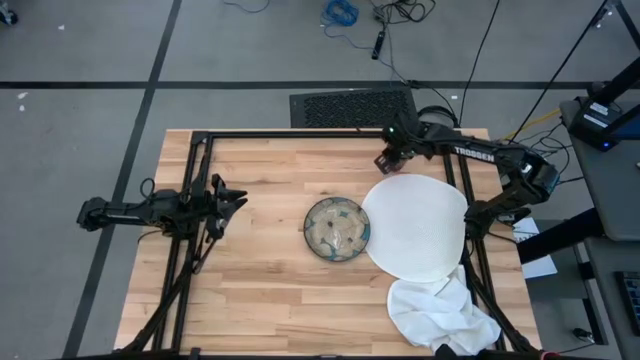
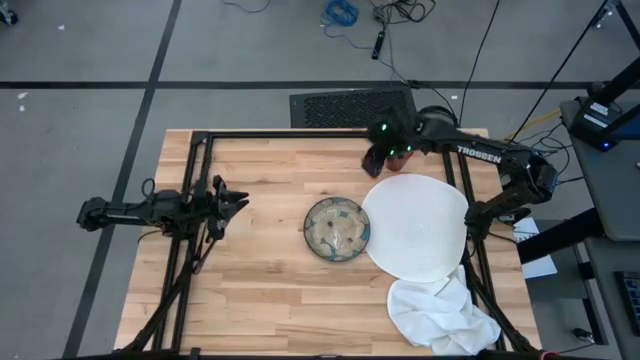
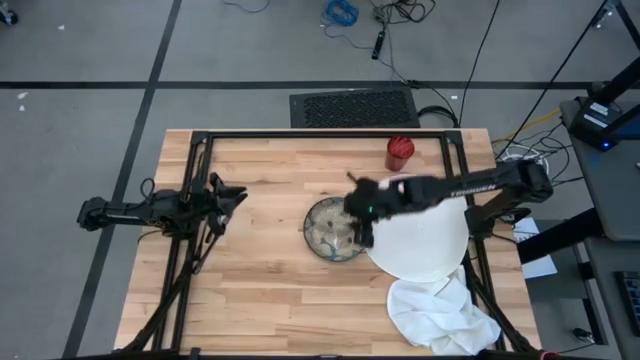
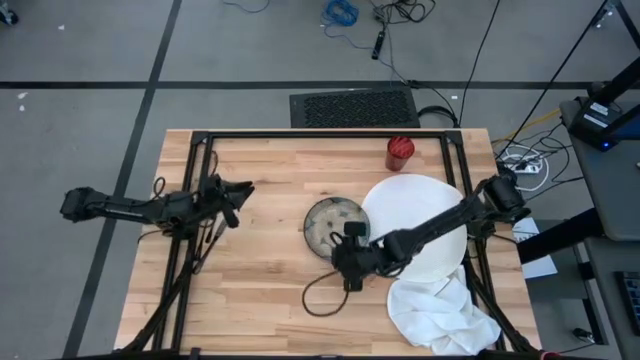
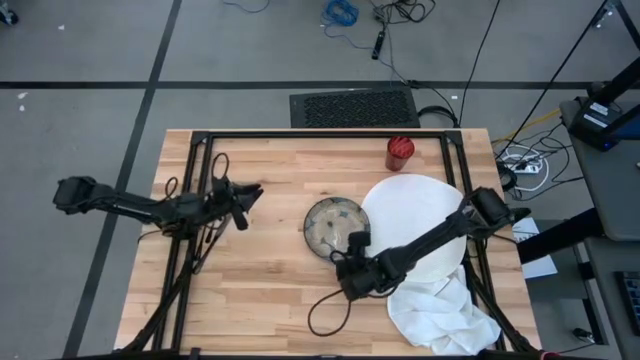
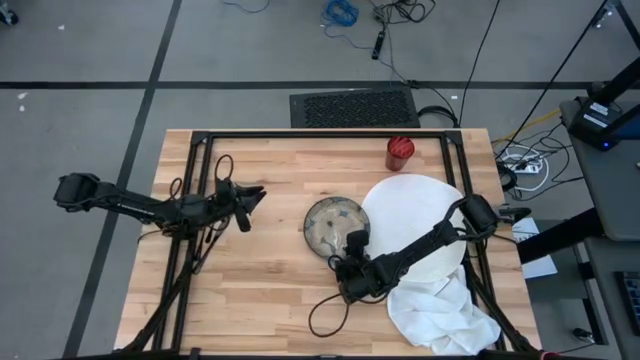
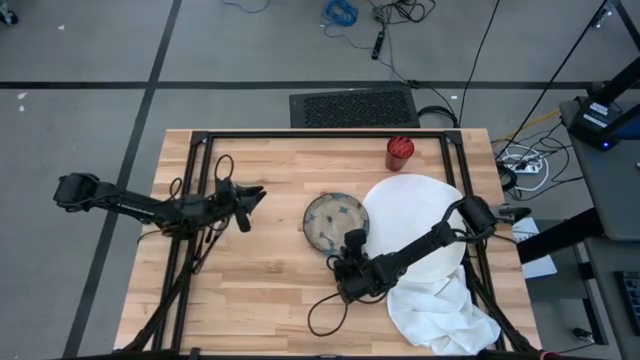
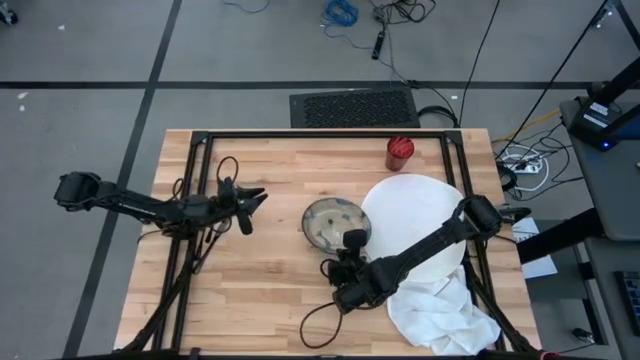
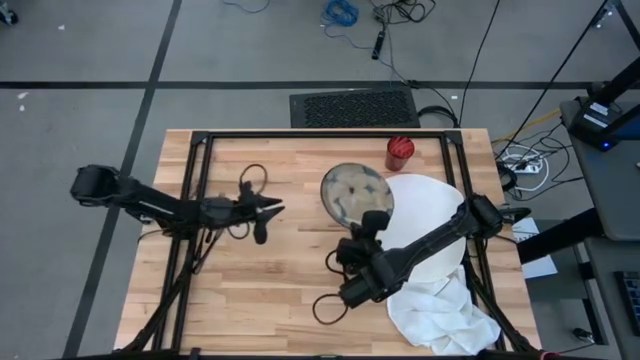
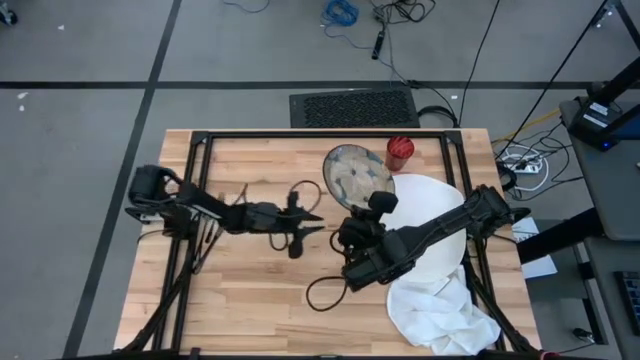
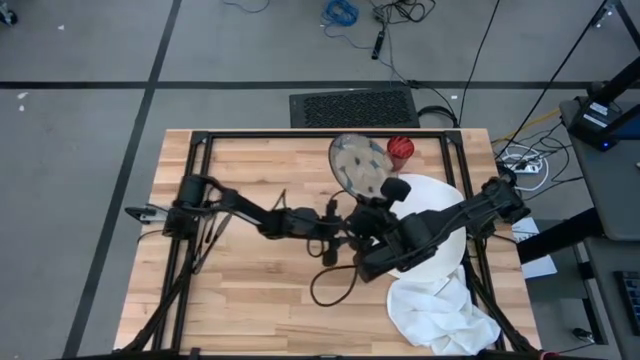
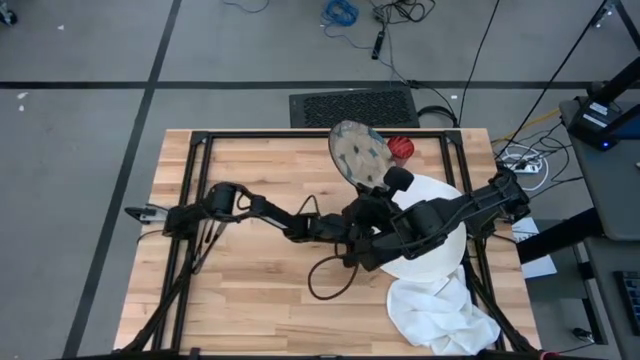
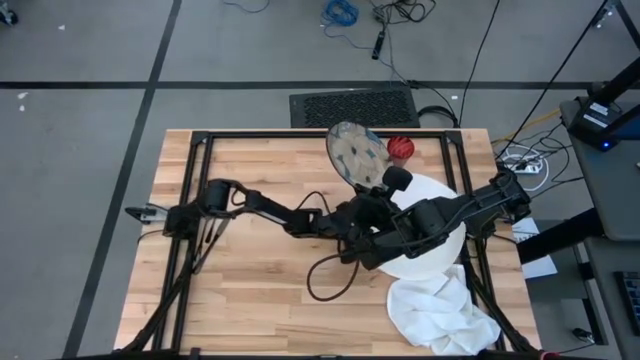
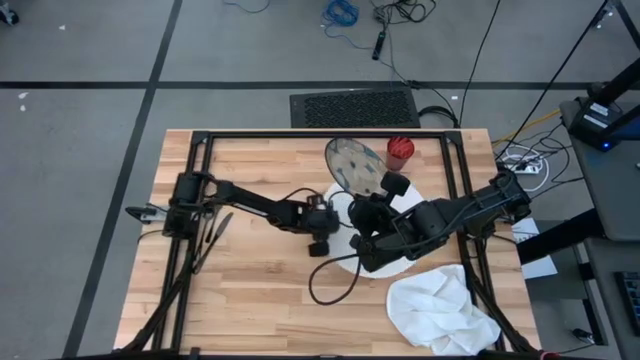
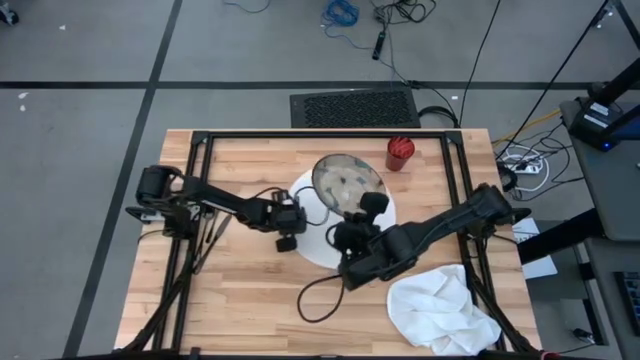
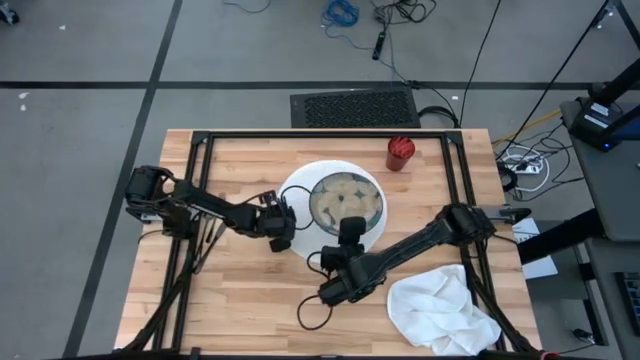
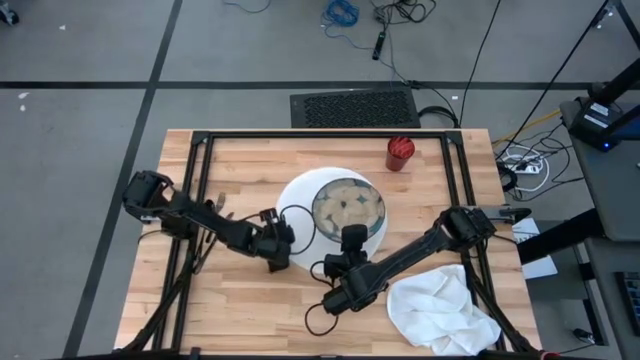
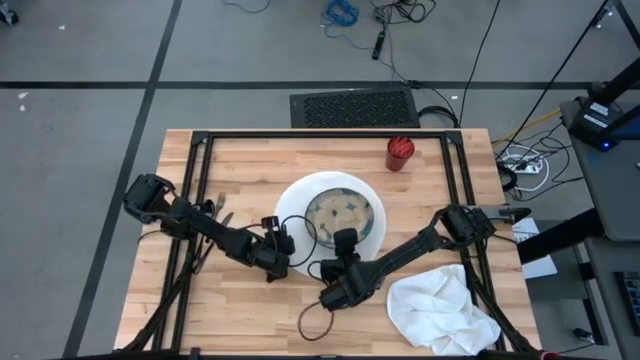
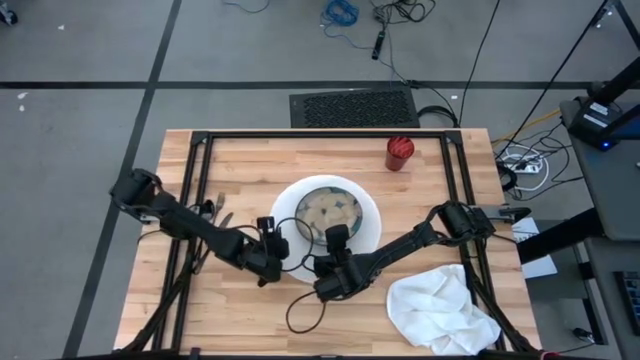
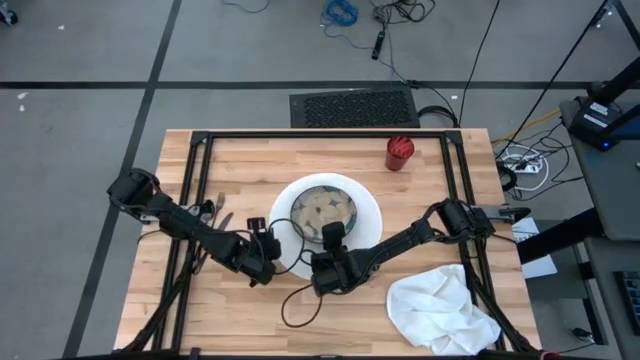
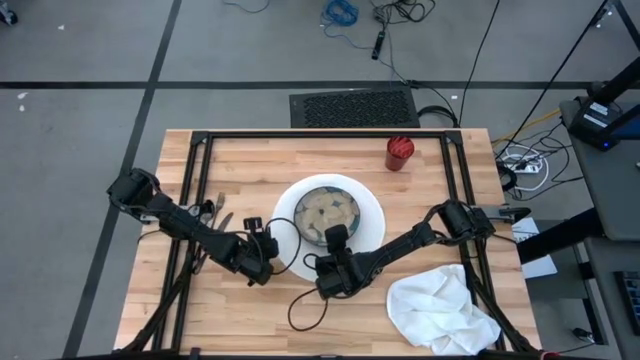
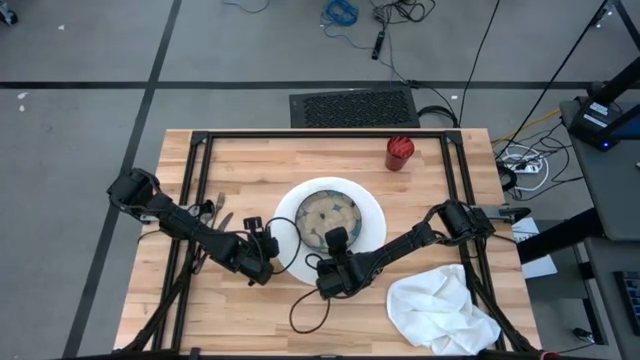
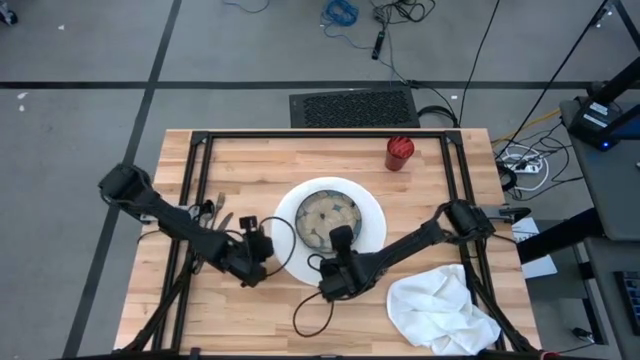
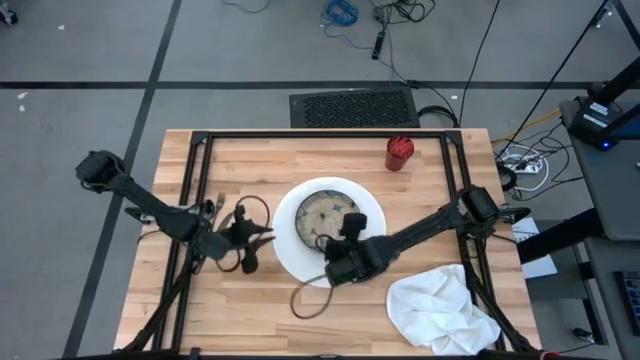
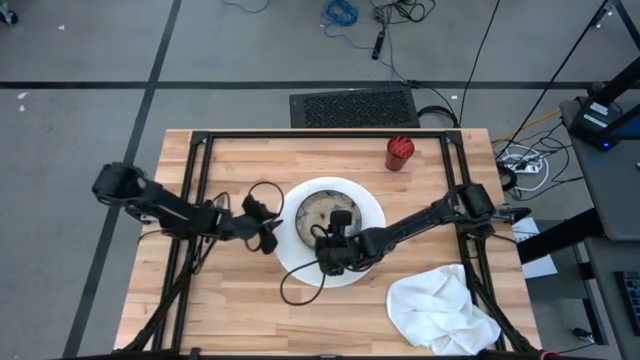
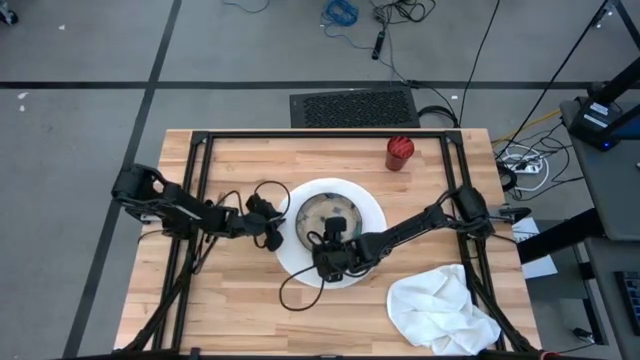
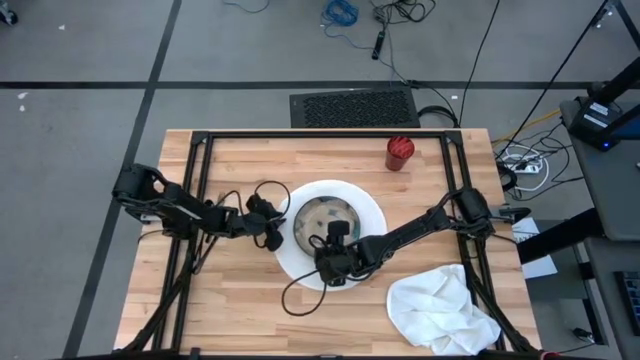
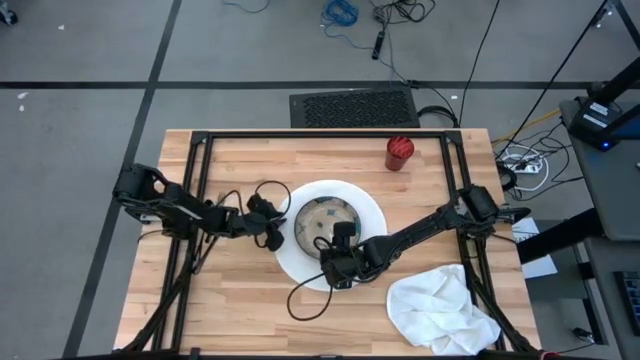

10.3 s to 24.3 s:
Task: Set table place
Put the blue patterned plate in the center of the white table mat

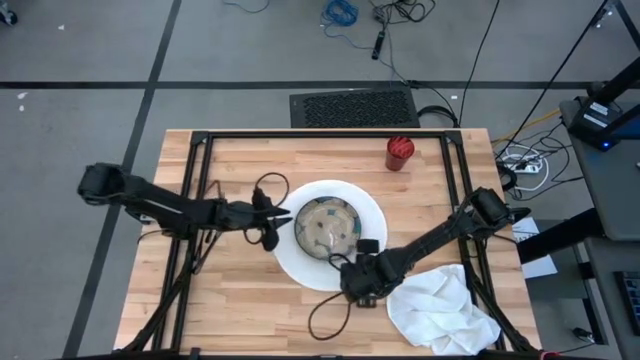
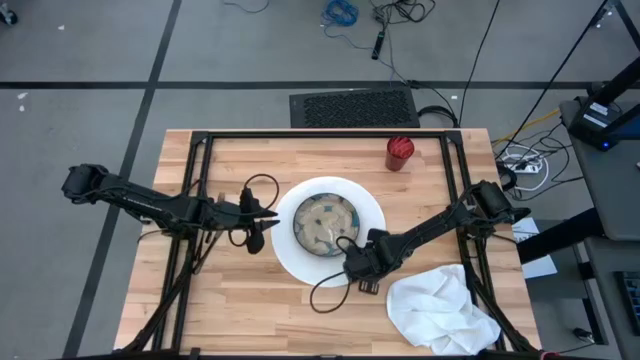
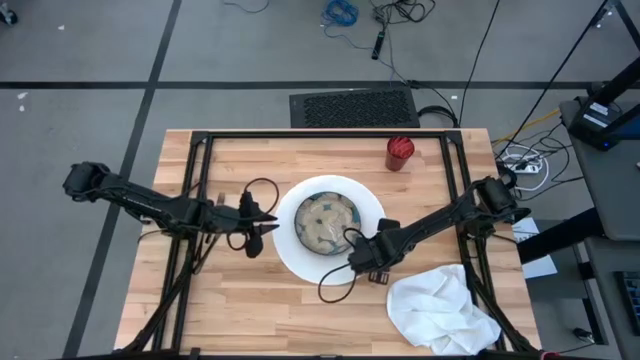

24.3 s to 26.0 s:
Adjust the white table mat

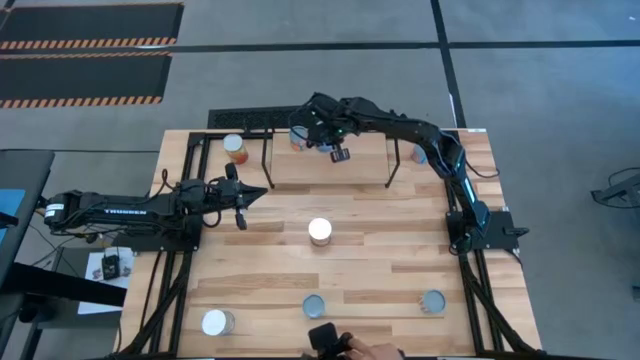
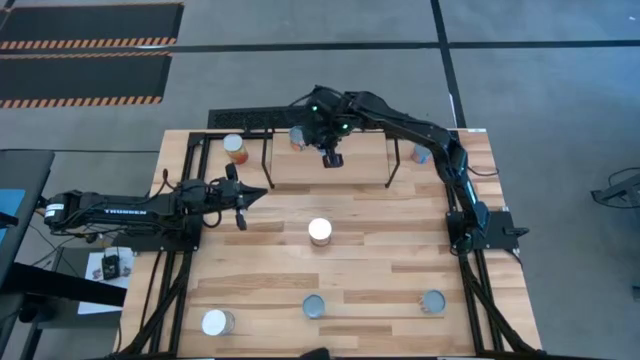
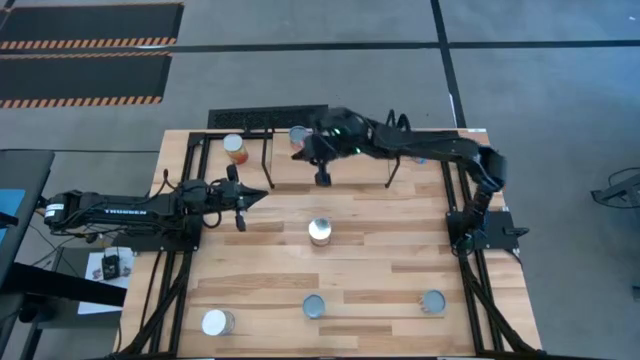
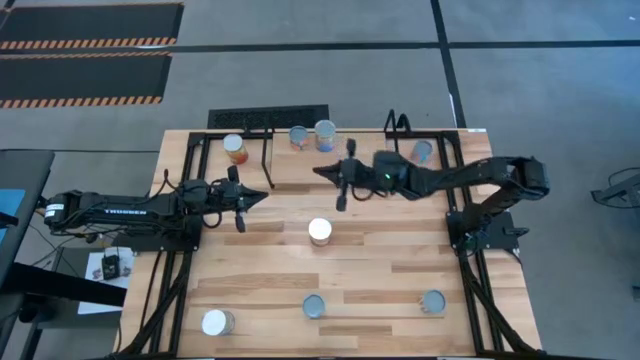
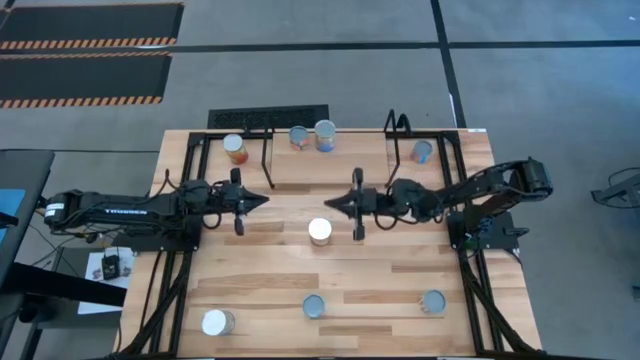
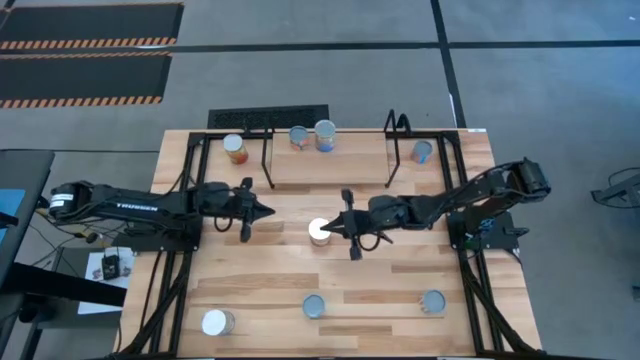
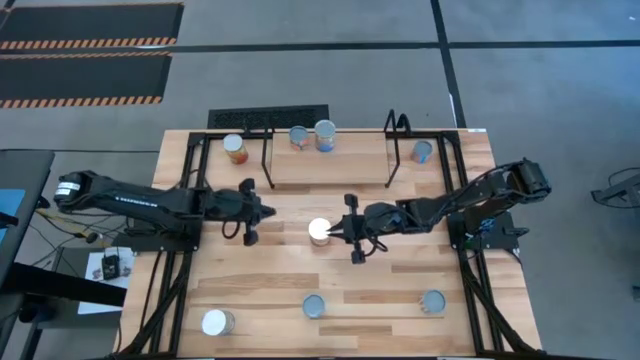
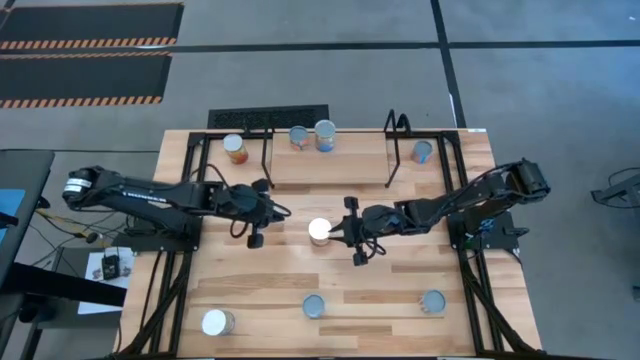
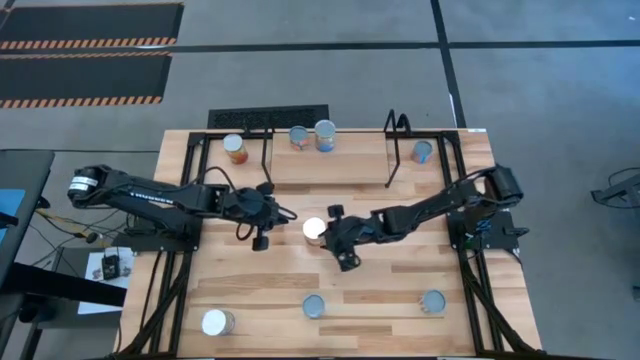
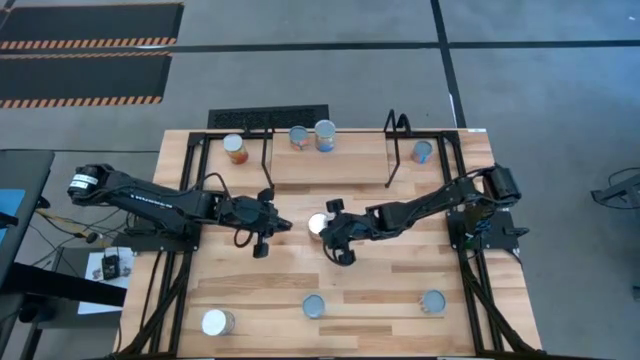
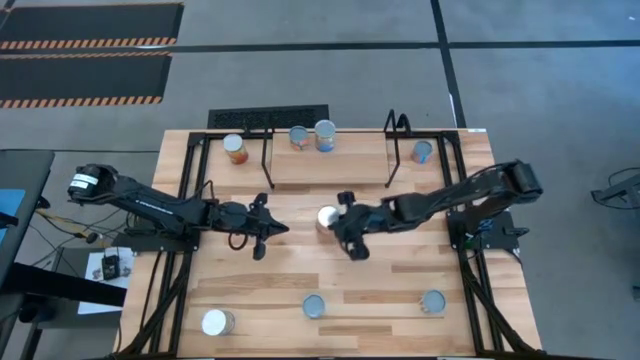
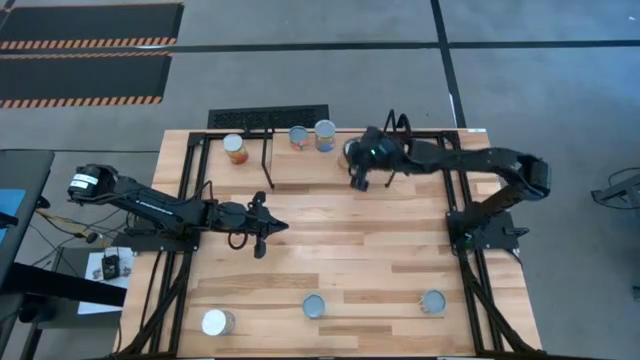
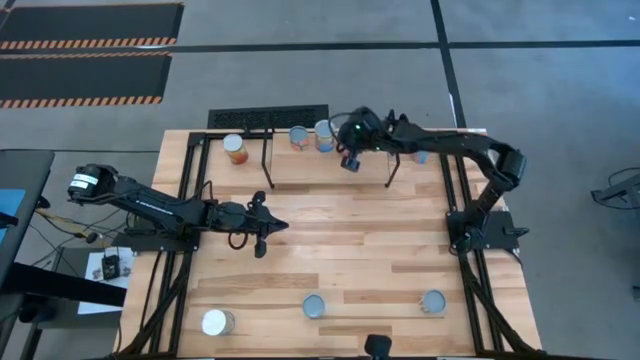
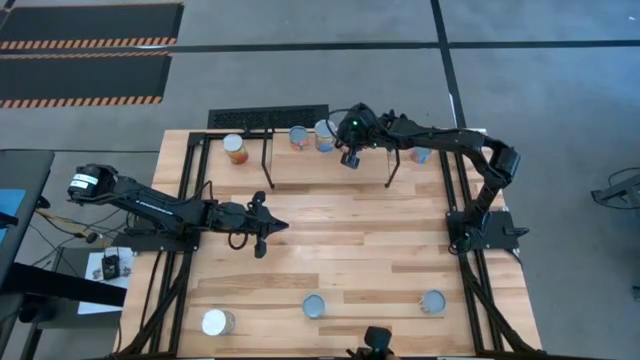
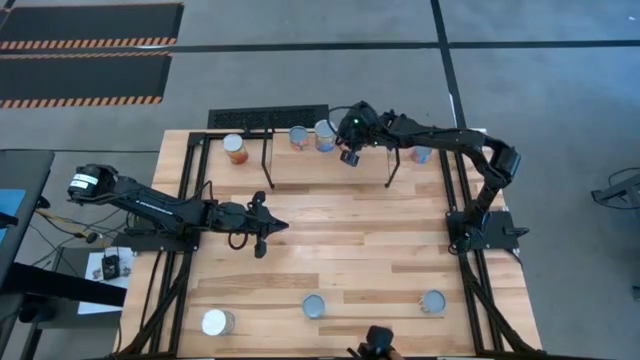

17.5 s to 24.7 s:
Task: Pick and place cans onto a shelf
Put the left canned corn on the shelf
